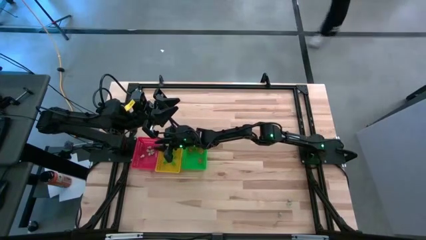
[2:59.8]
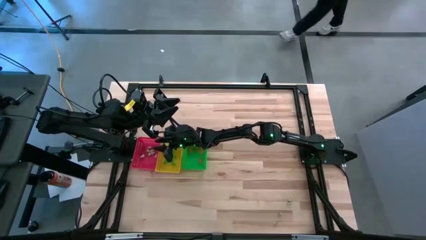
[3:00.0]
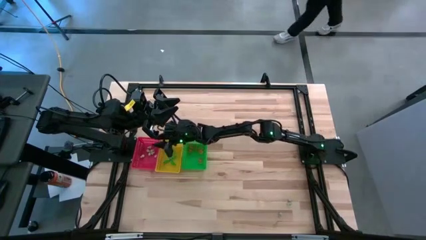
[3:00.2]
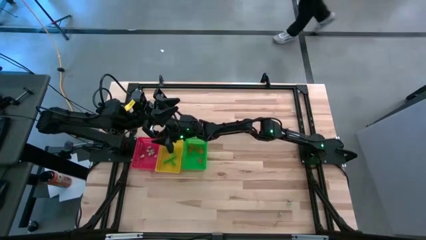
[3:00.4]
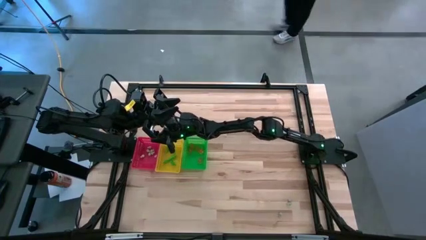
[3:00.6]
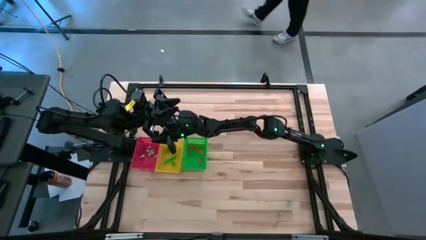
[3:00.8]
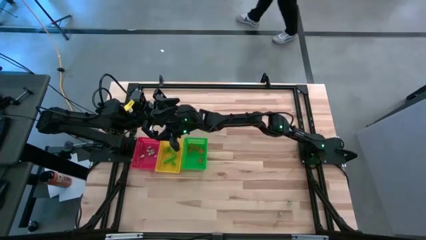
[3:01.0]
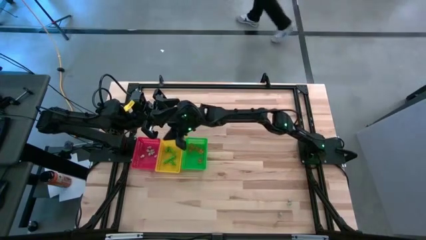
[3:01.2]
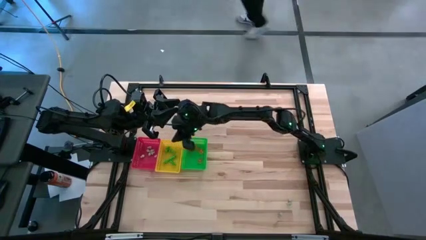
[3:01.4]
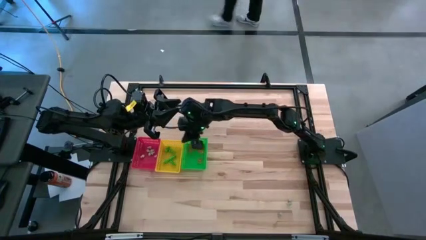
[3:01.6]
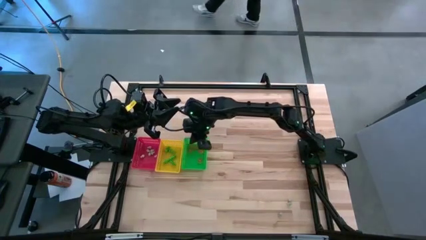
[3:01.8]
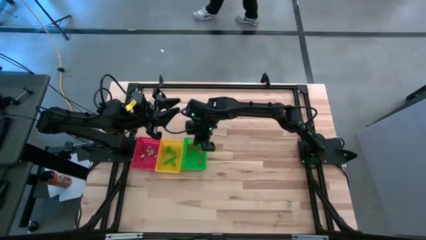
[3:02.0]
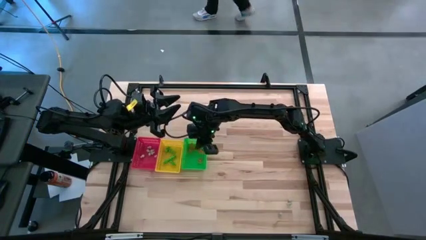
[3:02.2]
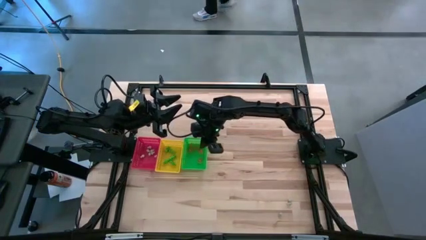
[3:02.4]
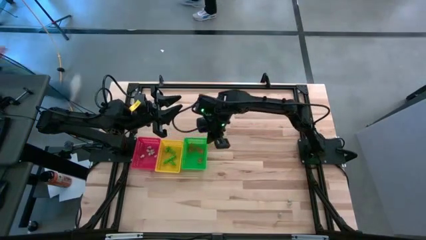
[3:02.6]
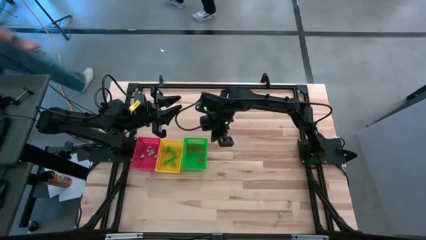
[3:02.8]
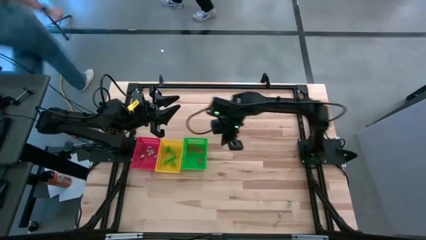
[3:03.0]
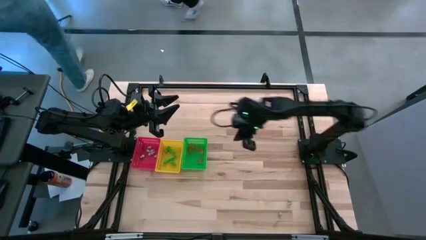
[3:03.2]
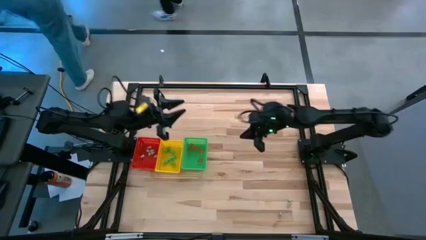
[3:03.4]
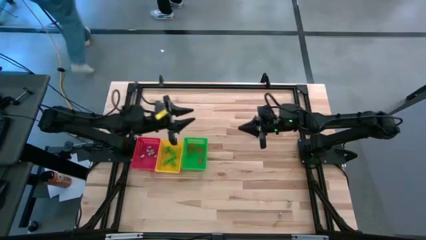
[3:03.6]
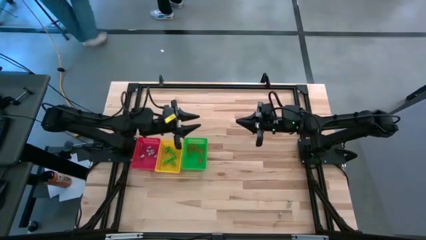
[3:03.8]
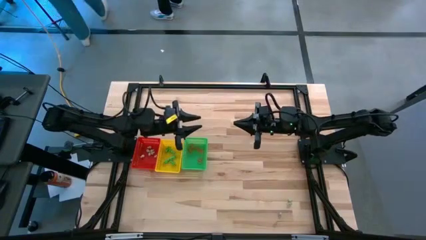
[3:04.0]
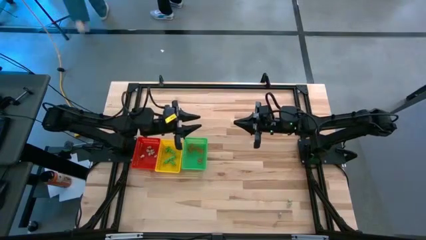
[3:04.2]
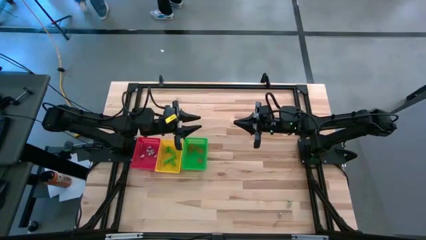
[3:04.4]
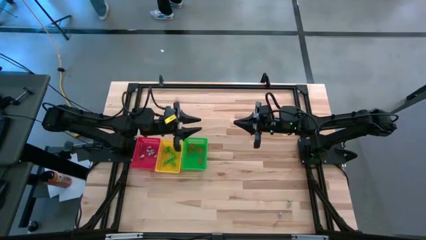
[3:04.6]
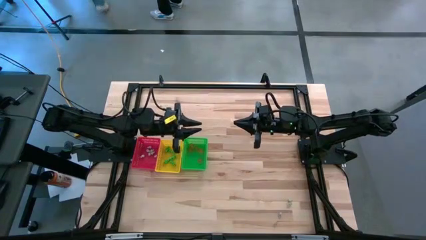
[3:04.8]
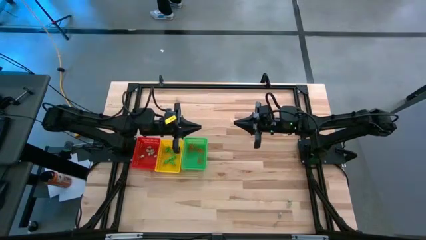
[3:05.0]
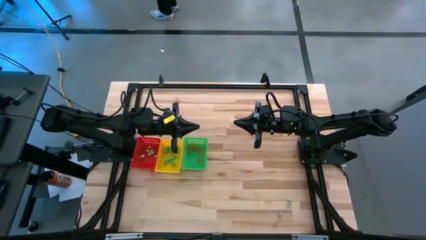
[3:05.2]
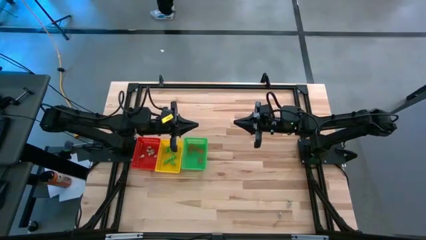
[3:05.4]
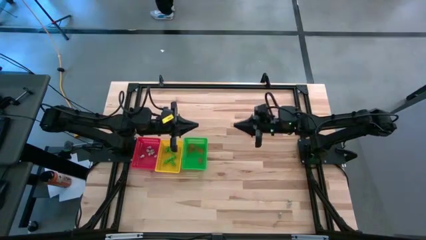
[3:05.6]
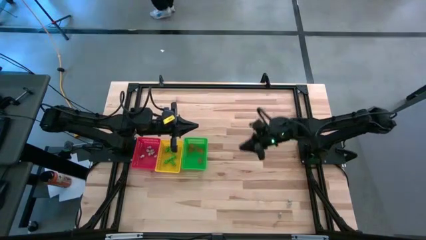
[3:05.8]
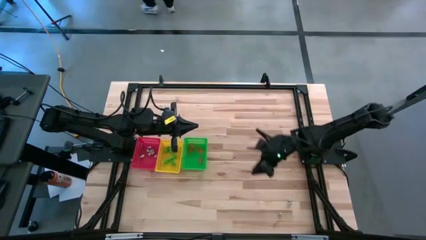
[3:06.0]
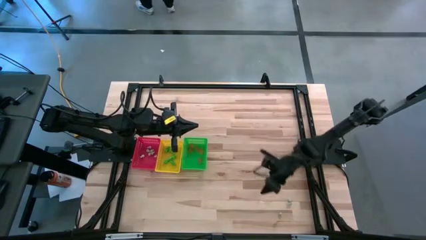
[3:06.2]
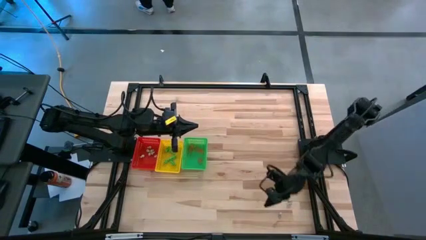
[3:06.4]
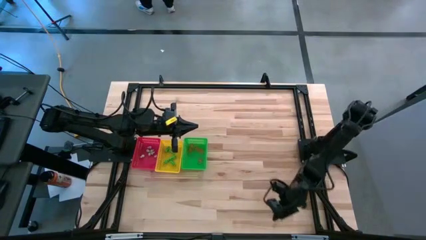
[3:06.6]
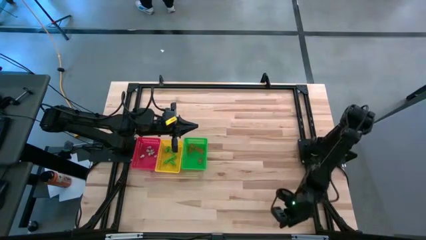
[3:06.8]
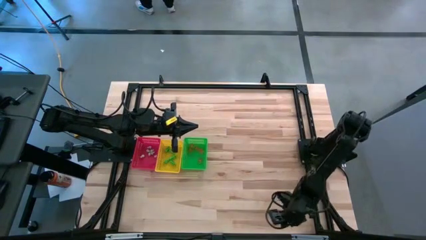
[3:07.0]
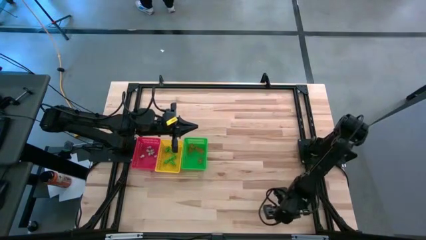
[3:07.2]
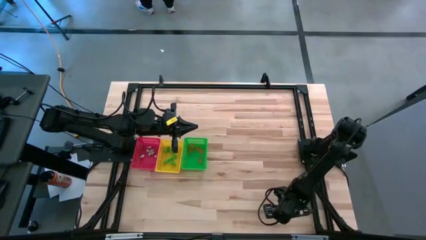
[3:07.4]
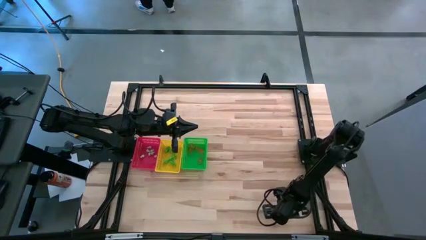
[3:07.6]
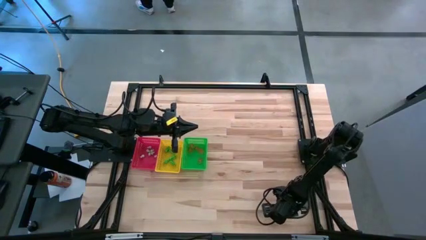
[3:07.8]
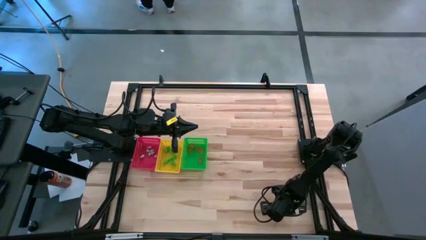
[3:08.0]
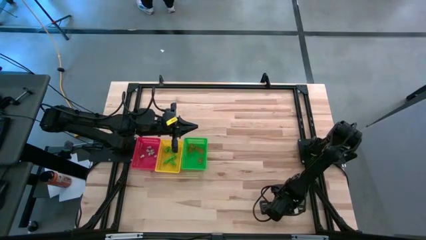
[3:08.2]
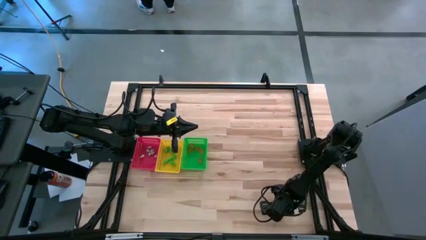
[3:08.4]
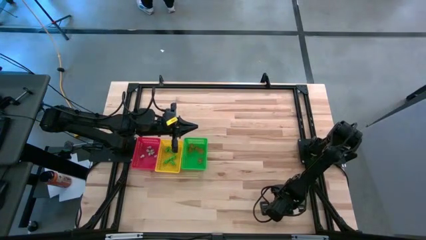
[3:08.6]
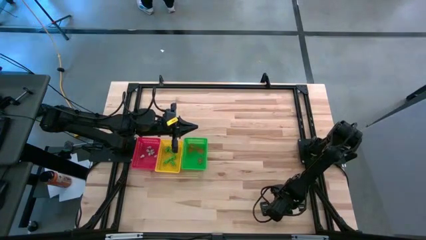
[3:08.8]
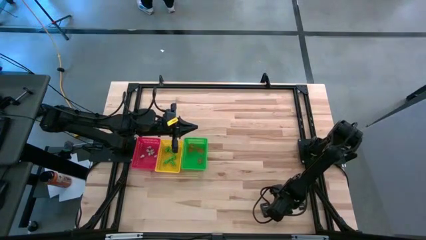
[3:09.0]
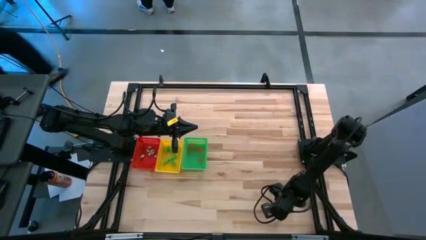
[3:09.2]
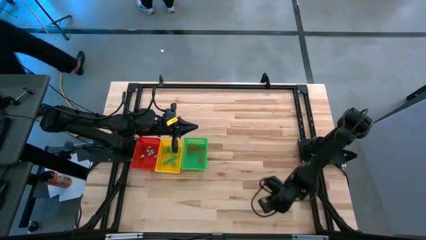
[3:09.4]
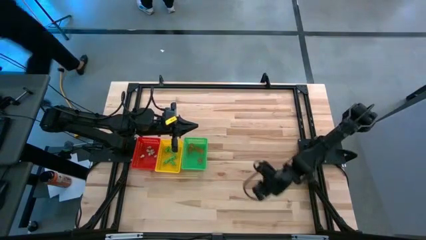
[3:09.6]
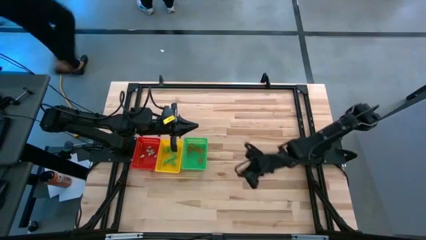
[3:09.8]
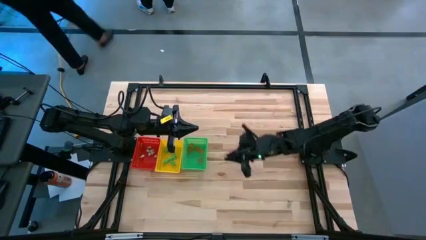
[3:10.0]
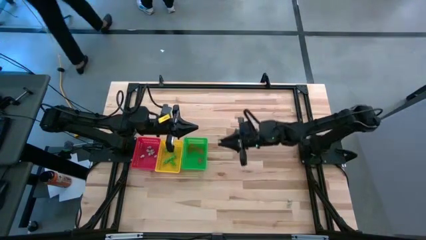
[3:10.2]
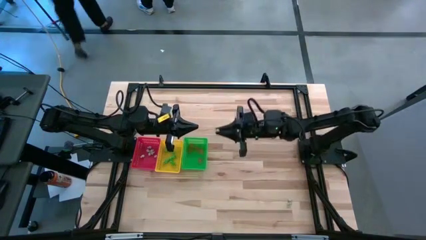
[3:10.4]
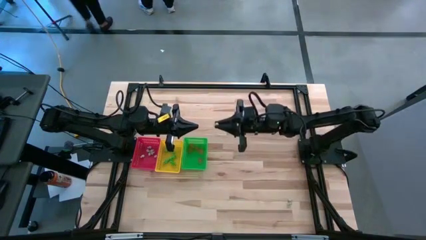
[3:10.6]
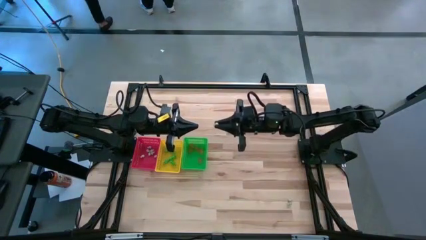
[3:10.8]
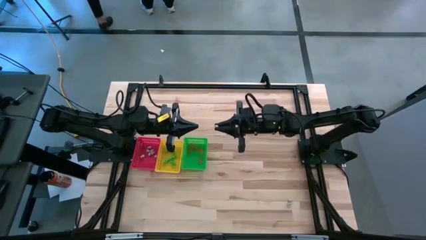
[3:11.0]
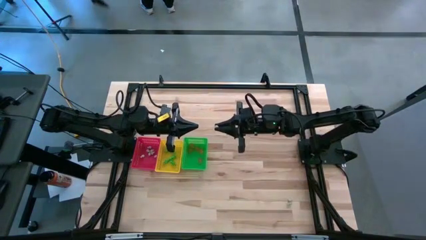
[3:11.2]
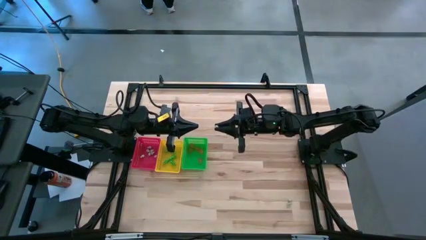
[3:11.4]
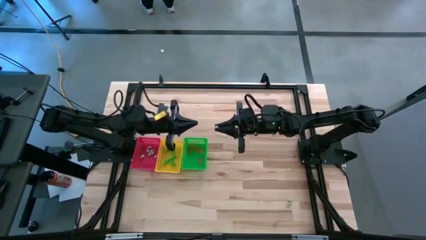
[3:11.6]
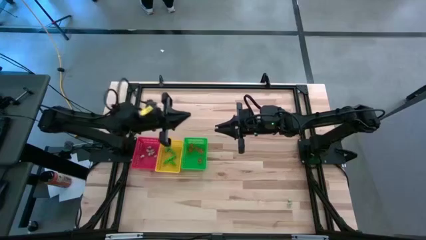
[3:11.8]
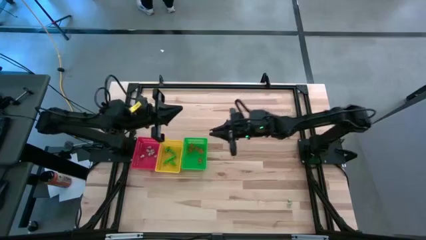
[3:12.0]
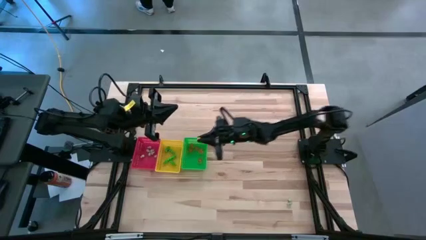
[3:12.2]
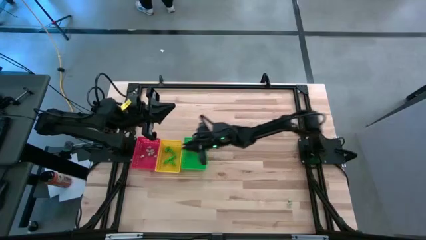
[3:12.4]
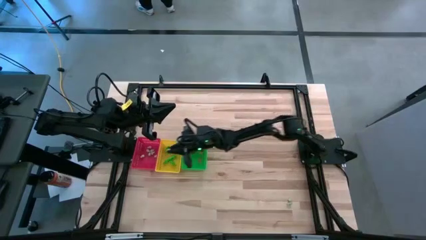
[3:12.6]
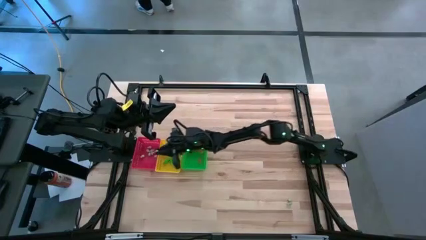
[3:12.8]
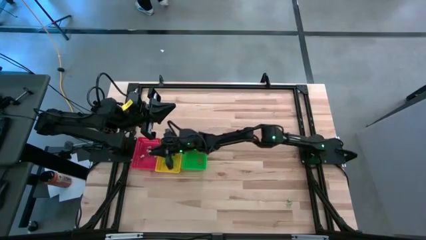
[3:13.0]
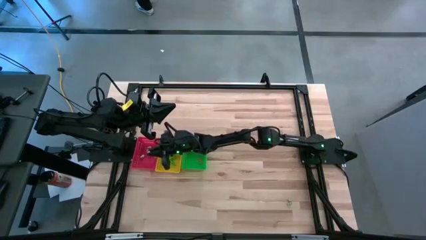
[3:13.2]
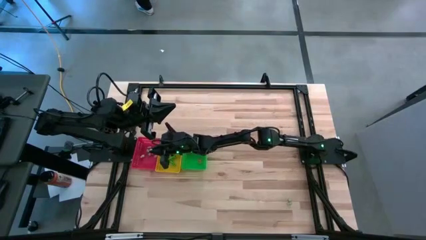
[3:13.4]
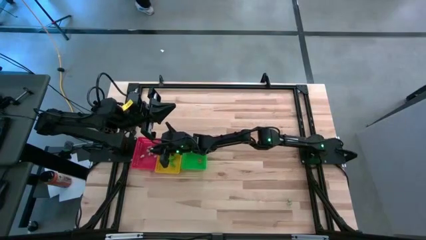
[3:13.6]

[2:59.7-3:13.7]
Task: Sort Halloween decoration
Put the white skull toy into the red bin

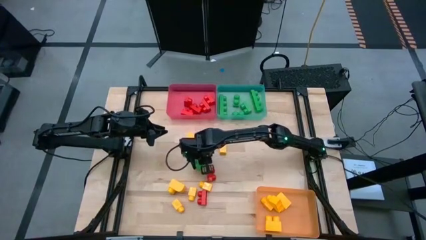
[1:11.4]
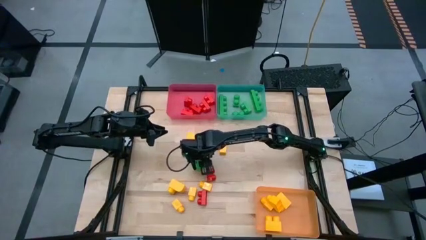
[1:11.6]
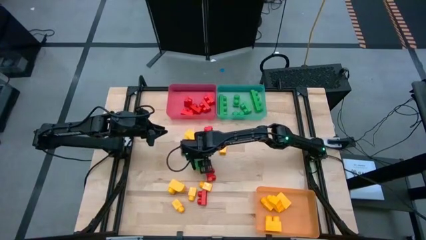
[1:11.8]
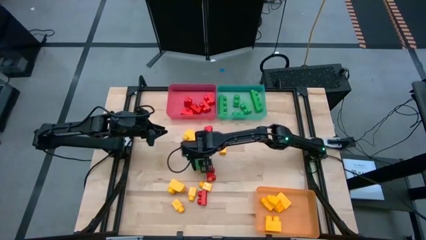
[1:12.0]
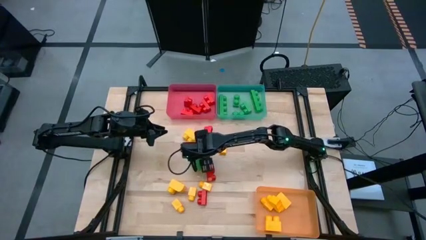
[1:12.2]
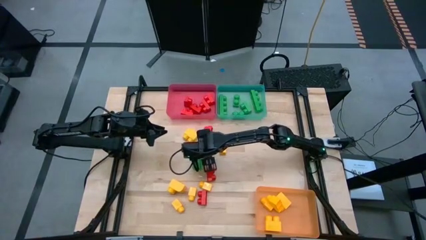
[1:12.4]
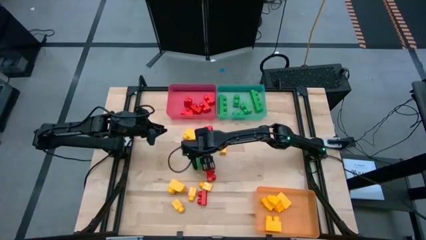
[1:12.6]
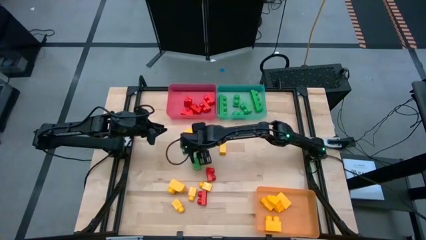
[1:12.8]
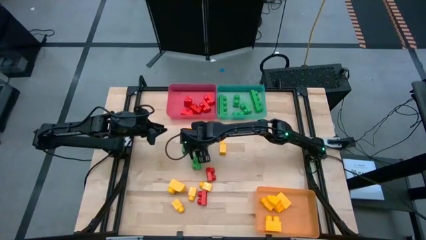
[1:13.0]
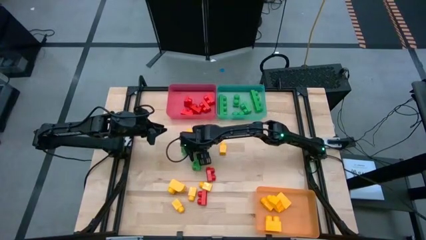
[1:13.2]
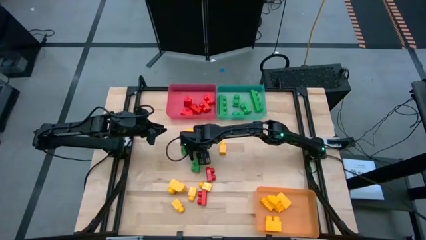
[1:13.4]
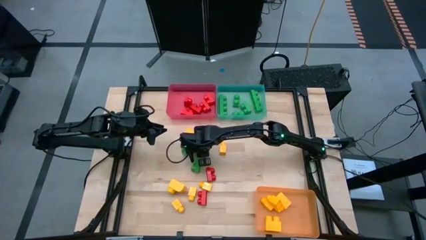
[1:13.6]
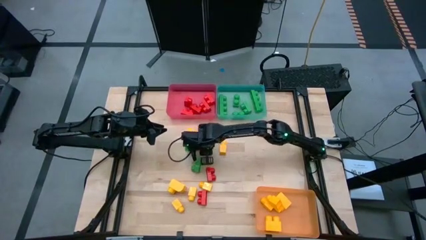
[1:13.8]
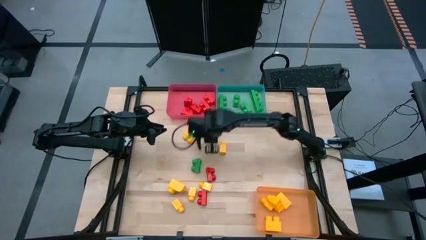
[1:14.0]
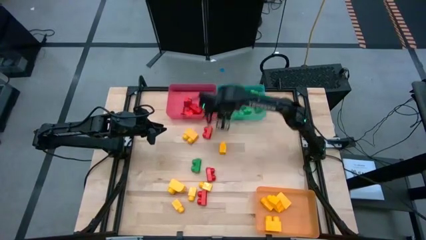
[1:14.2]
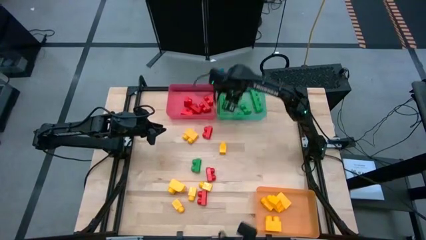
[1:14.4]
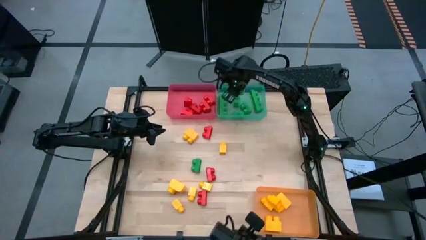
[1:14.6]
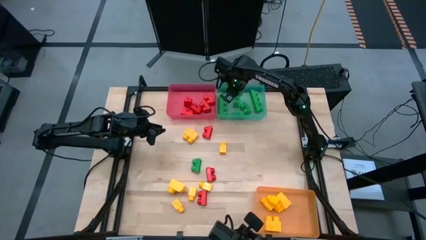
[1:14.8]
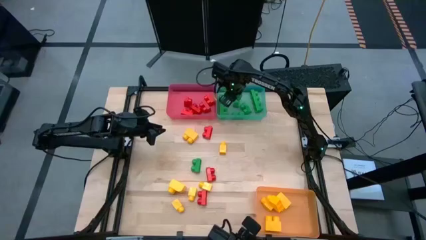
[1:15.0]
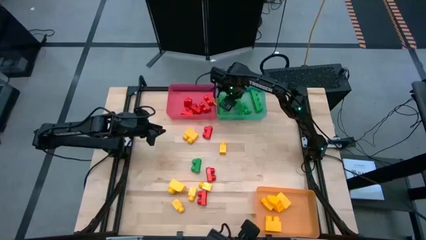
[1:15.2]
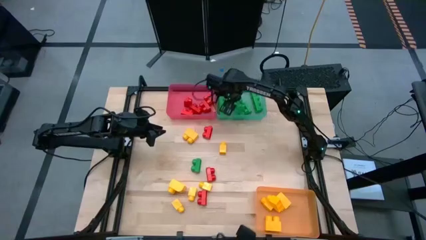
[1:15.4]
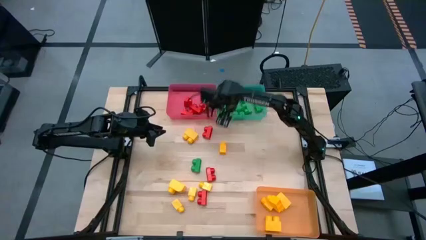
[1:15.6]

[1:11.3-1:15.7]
Task: Sort blocks
Put the green game piece into the green bin
